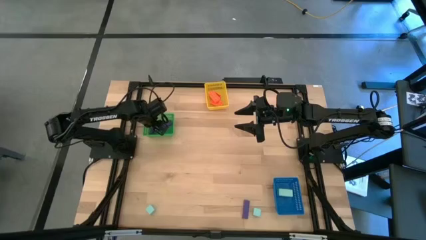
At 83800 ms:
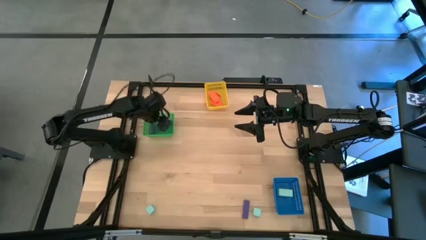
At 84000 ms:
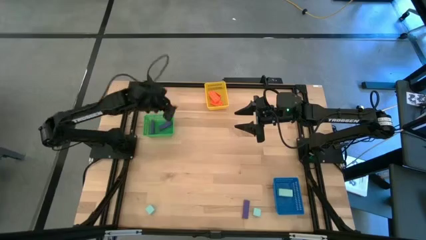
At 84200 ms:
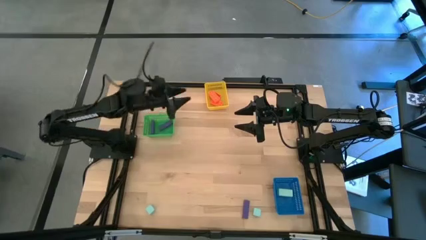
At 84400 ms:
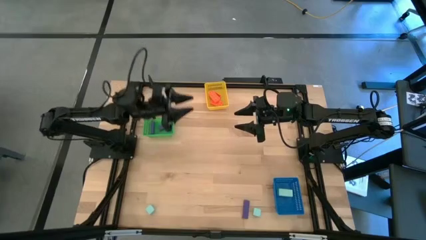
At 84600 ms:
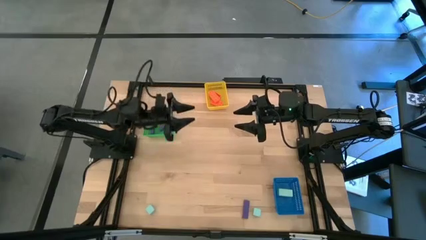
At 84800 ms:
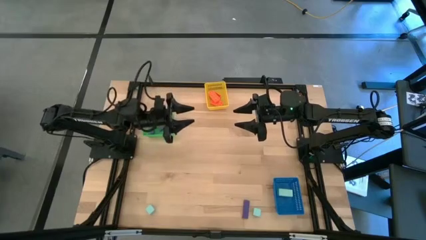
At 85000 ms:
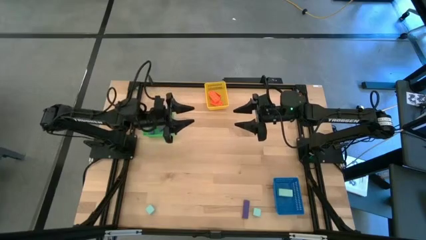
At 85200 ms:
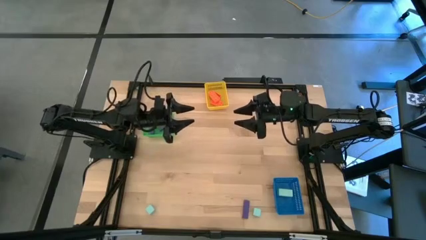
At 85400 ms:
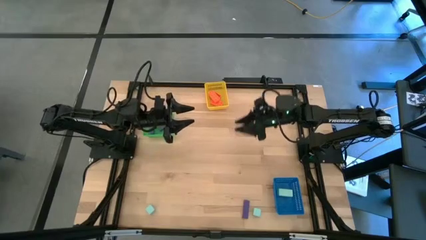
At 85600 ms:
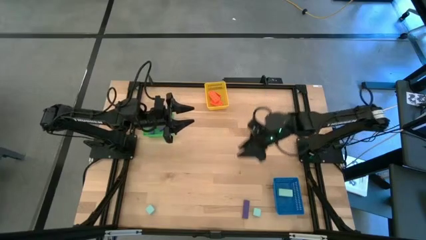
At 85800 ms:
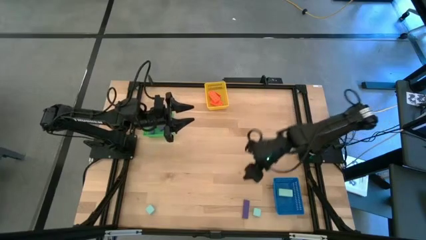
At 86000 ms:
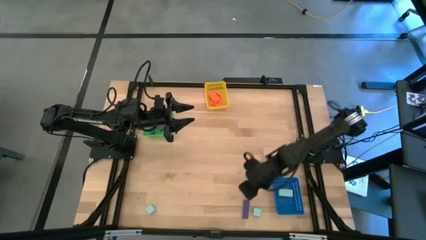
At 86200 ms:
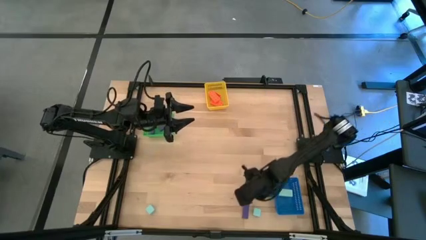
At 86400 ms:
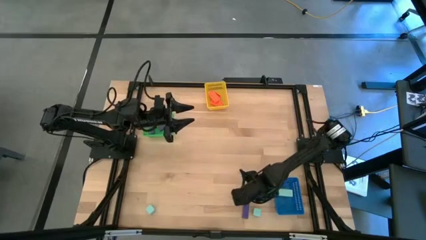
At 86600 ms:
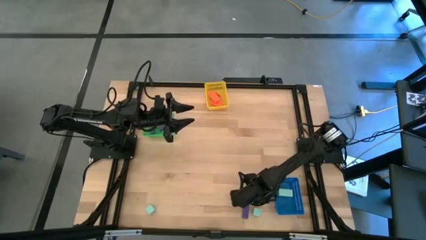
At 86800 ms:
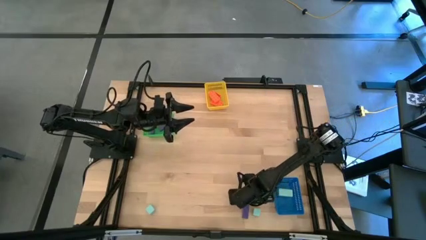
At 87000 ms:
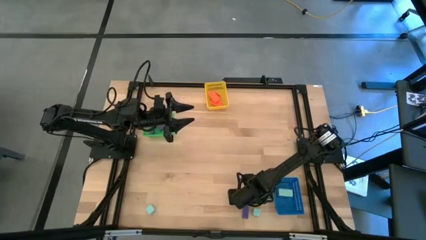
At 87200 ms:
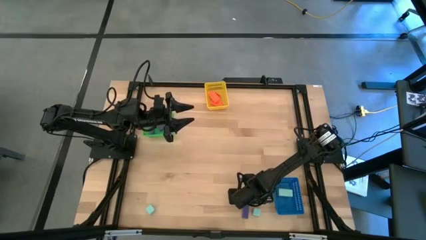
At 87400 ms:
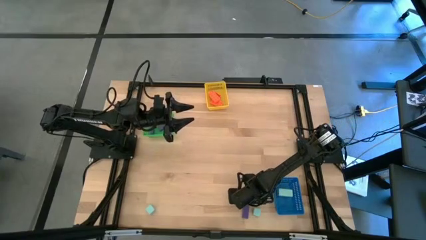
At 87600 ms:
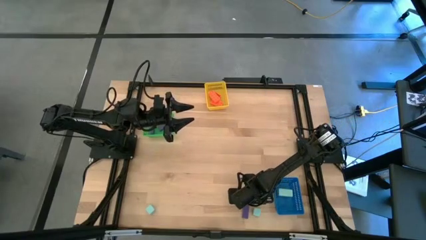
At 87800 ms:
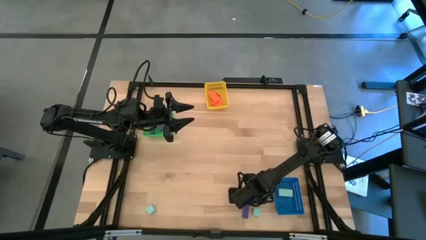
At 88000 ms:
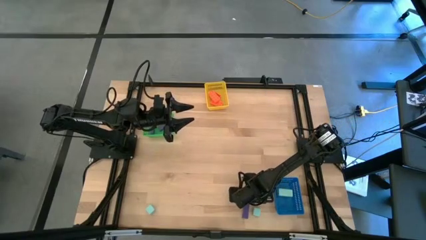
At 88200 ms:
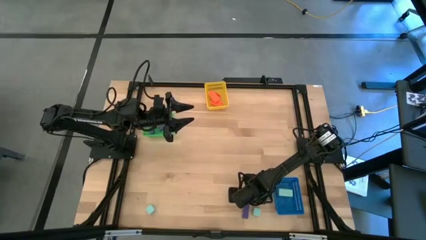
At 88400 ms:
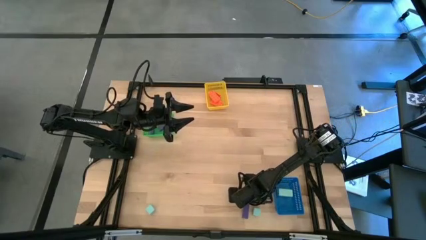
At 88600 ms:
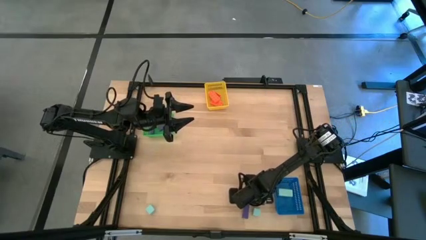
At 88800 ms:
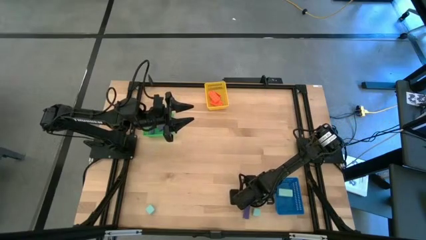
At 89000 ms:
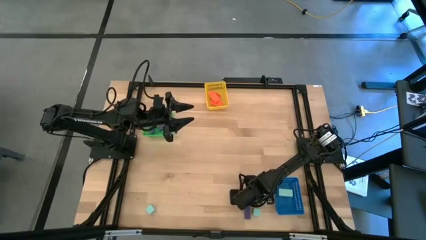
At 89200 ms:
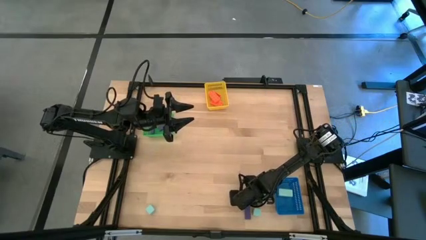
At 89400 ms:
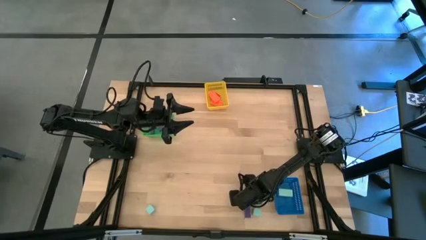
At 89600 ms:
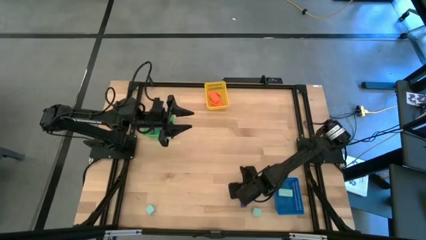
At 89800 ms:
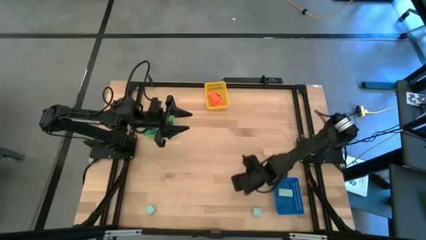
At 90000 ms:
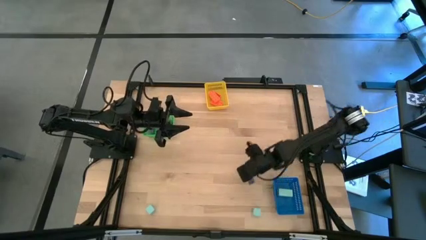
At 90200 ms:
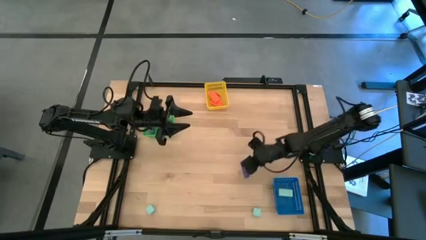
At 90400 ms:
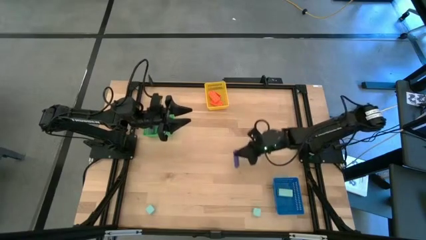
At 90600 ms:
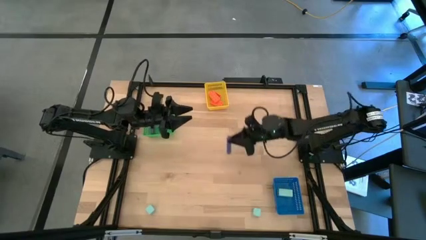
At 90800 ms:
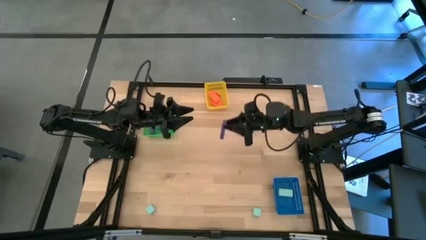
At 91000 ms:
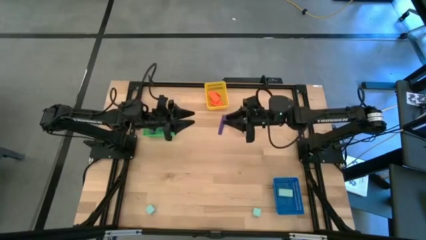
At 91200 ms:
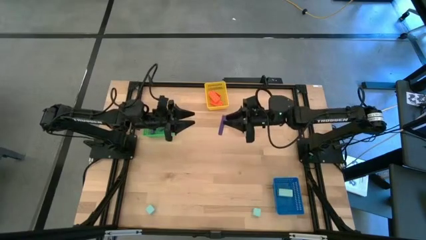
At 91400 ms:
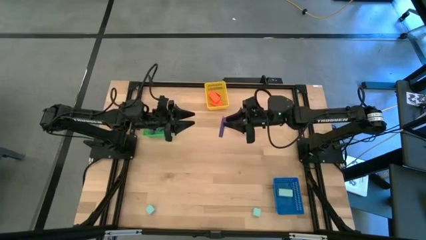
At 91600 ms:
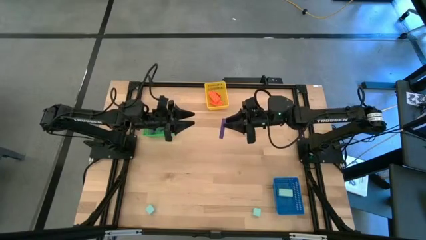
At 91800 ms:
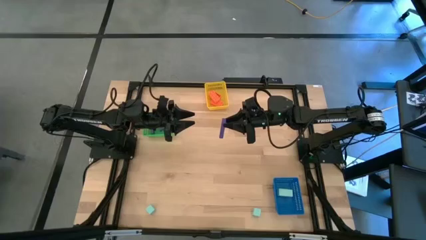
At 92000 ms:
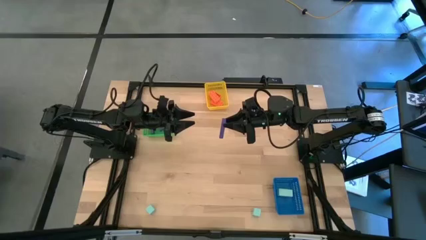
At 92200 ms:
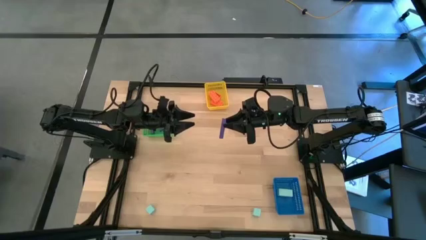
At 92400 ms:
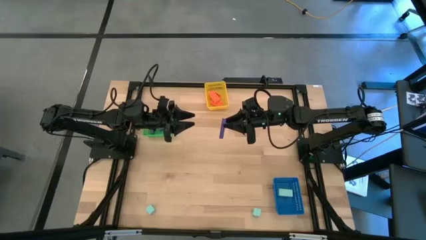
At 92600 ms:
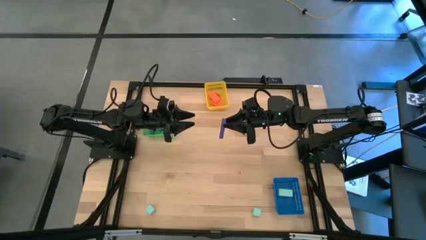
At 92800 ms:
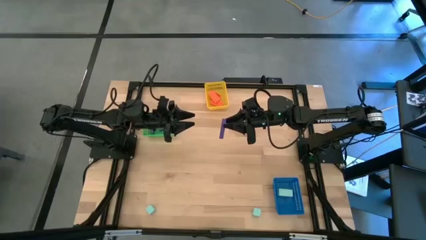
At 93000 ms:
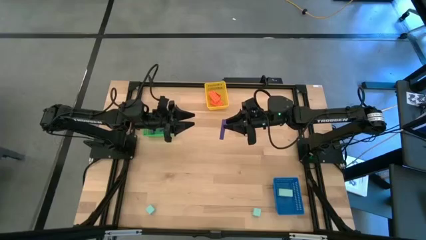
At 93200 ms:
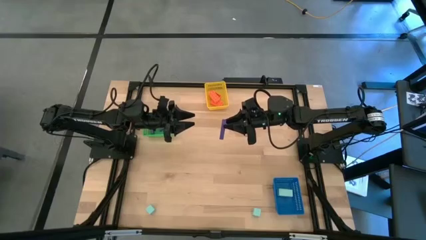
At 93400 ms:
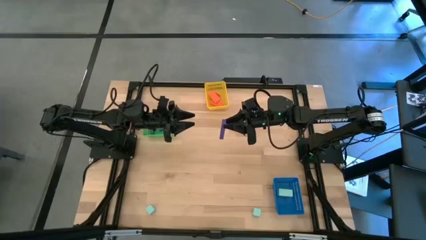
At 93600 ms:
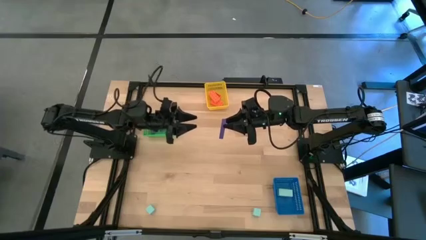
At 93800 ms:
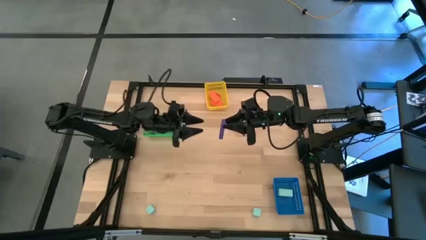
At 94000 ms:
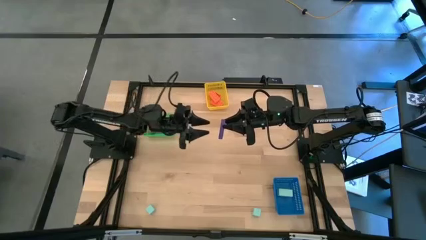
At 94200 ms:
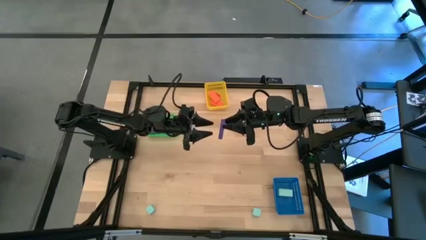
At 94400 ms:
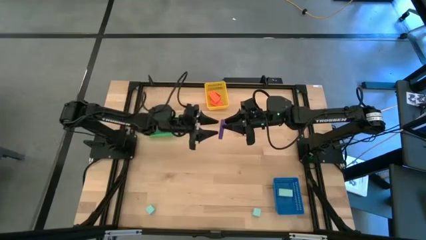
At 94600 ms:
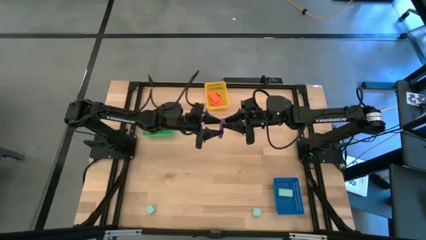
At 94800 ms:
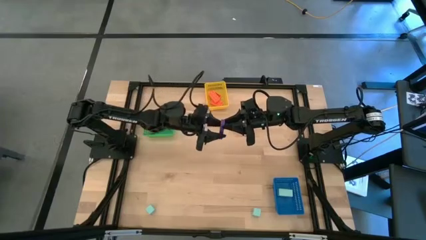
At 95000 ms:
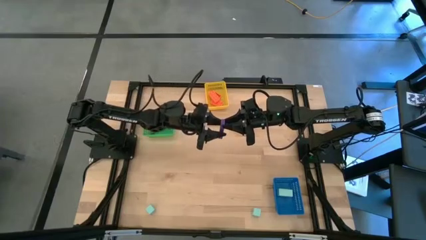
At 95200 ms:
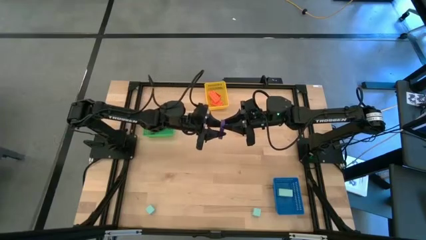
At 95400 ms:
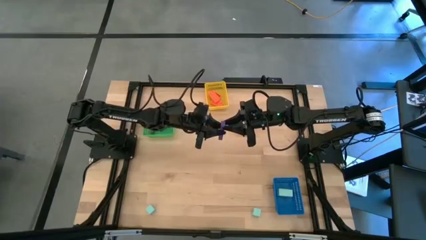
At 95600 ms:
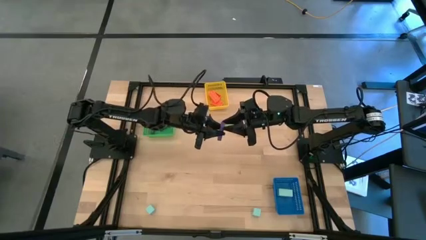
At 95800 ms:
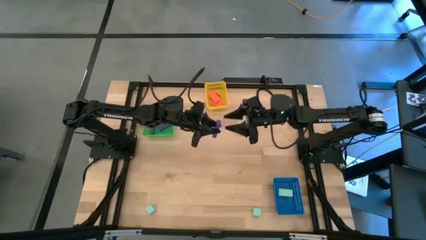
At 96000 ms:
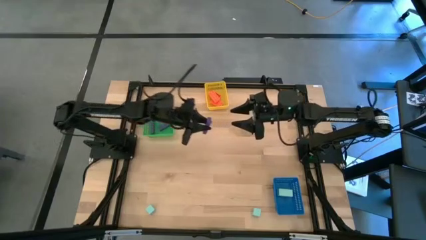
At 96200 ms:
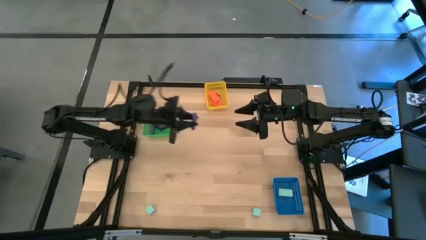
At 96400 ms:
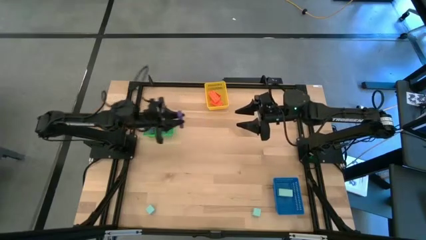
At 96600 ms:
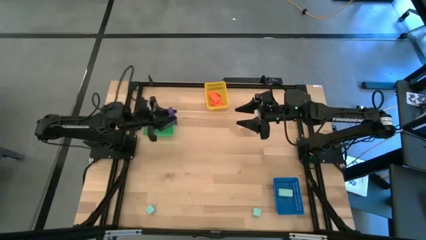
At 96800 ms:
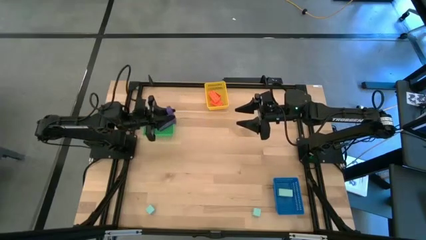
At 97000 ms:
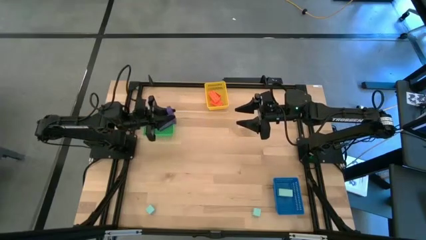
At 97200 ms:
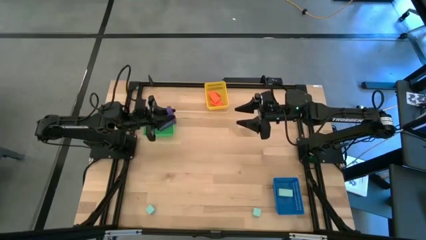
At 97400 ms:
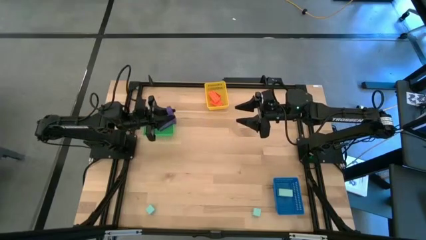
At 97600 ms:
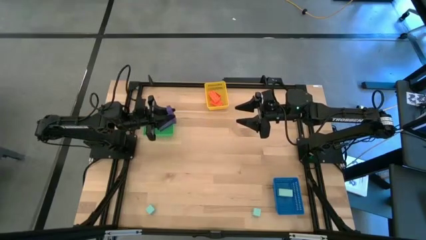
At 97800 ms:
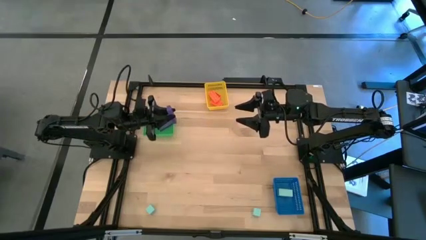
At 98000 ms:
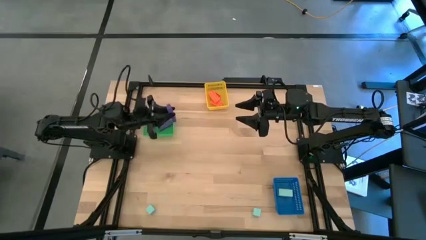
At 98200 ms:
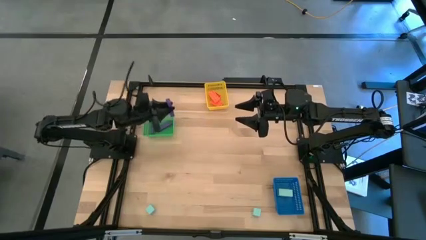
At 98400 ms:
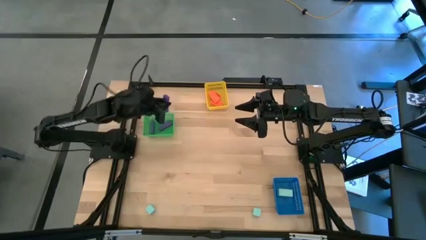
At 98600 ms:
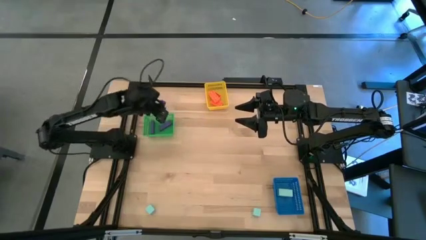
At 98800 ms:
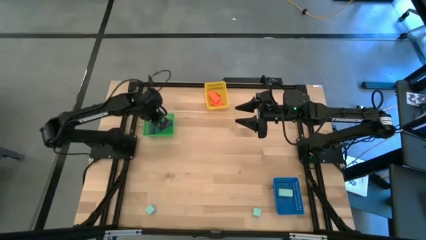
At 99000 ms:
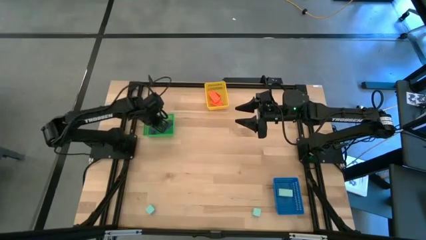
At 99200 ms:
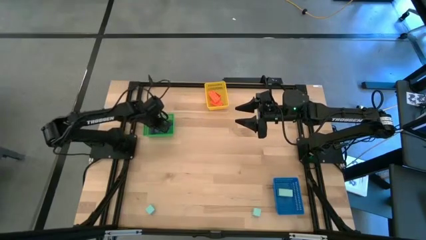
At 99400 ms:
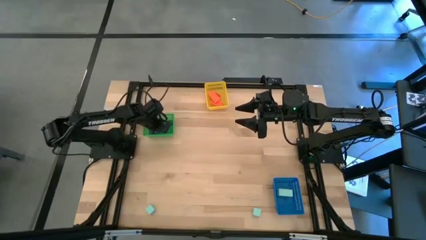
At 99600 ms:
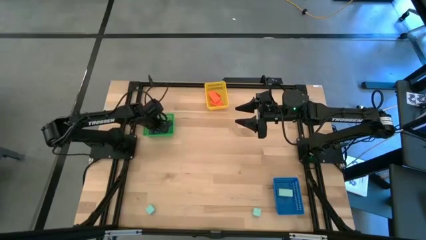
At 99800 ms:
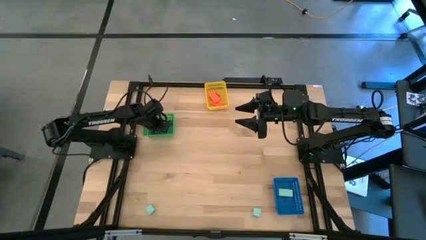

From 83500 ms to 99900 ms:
Task: Sort & place blocks by color
Put the violet block into the green bin
